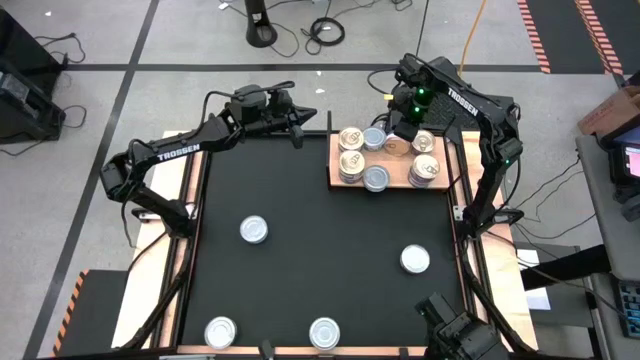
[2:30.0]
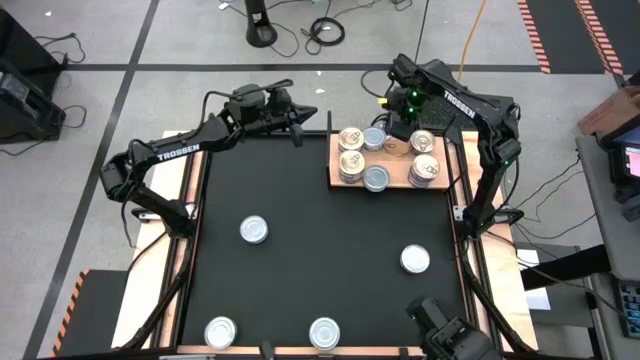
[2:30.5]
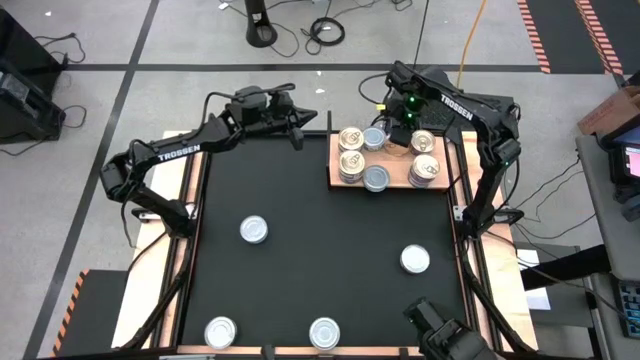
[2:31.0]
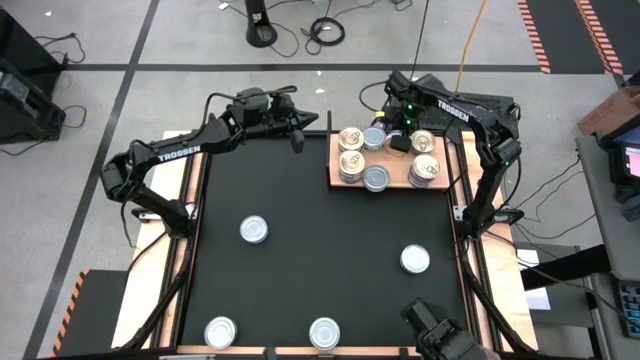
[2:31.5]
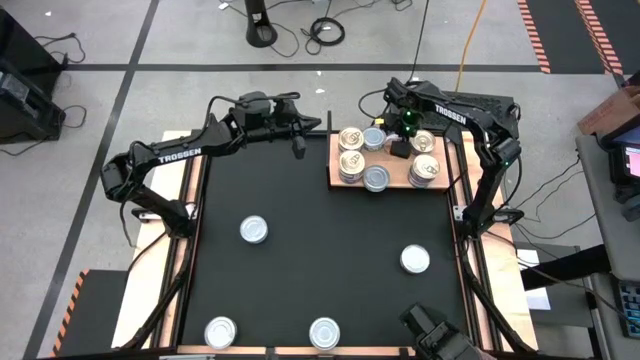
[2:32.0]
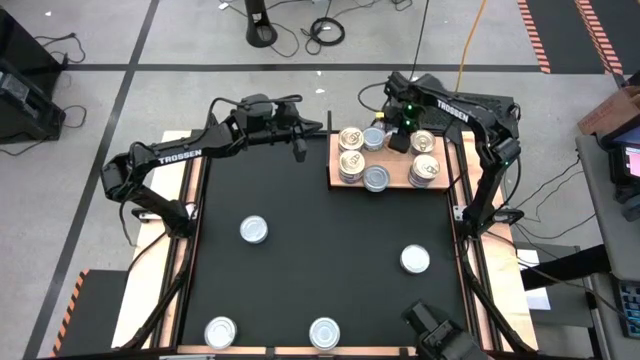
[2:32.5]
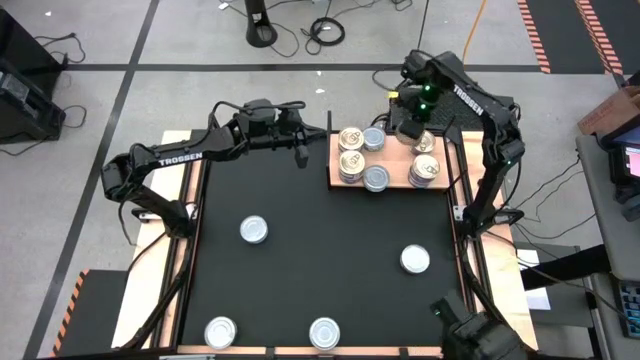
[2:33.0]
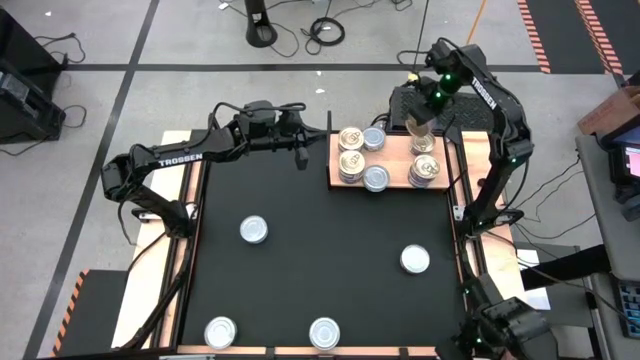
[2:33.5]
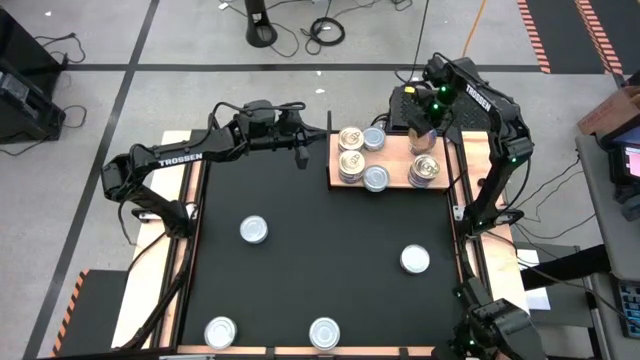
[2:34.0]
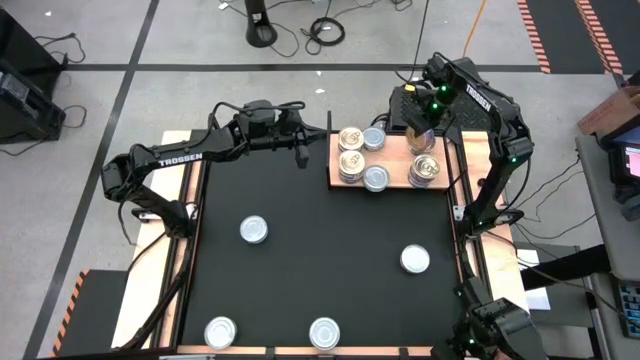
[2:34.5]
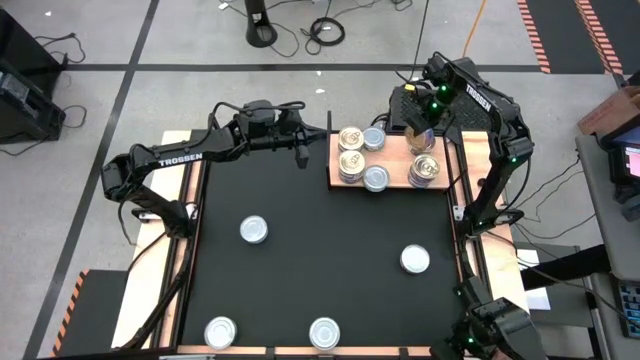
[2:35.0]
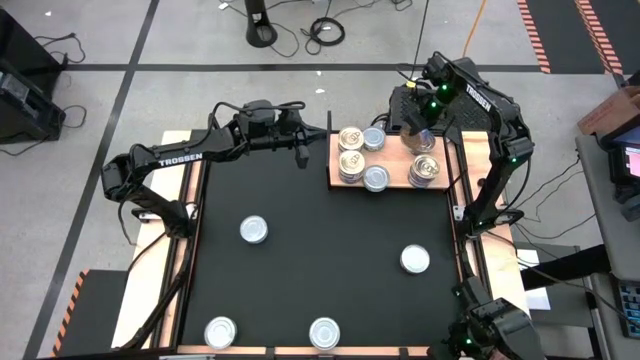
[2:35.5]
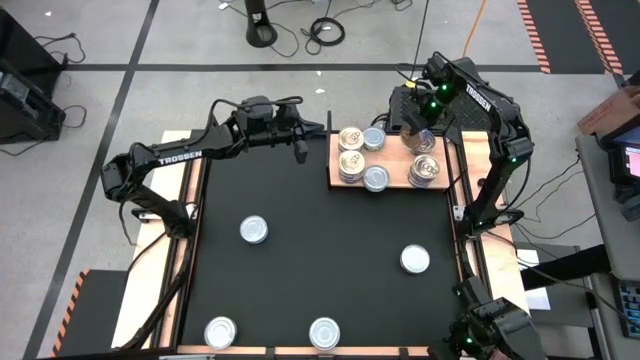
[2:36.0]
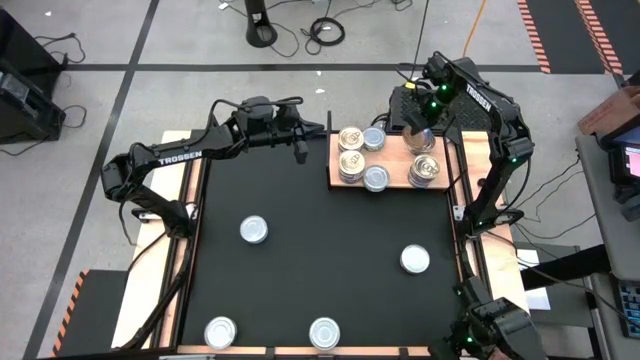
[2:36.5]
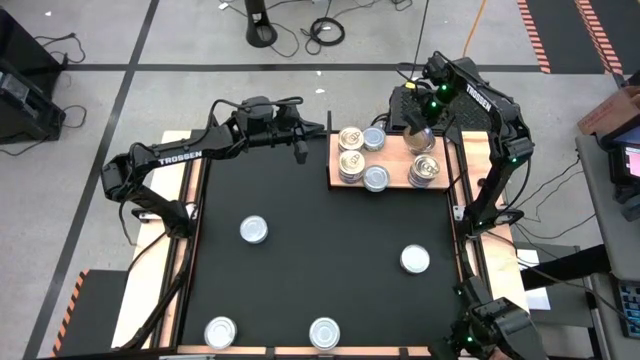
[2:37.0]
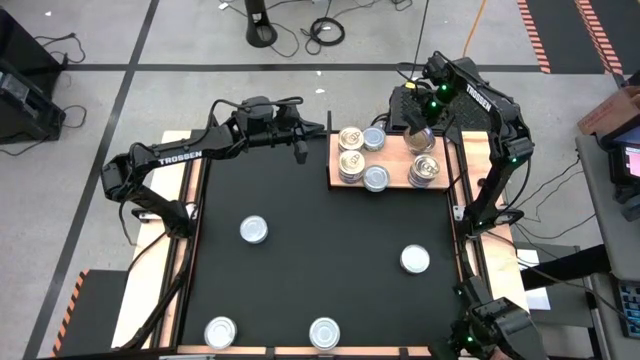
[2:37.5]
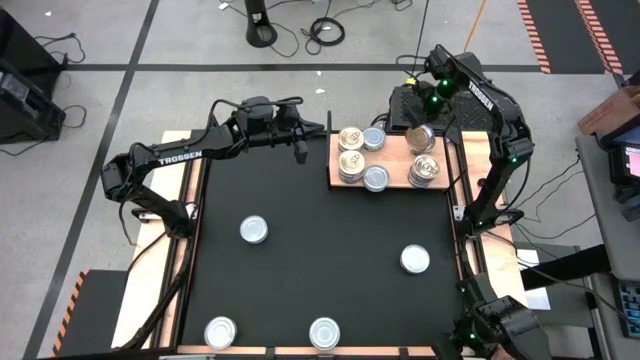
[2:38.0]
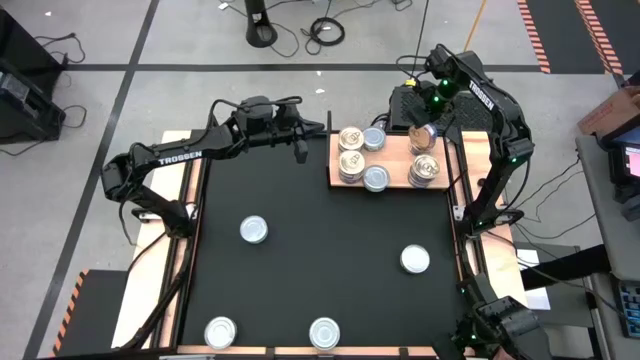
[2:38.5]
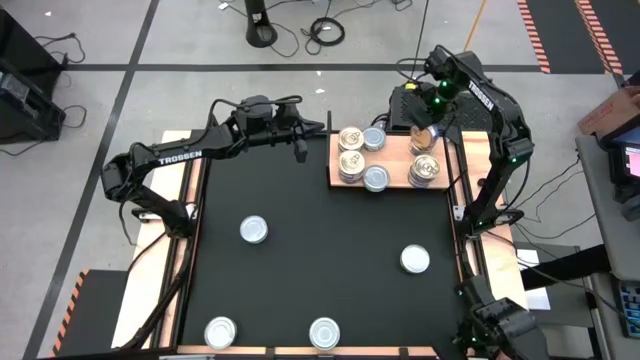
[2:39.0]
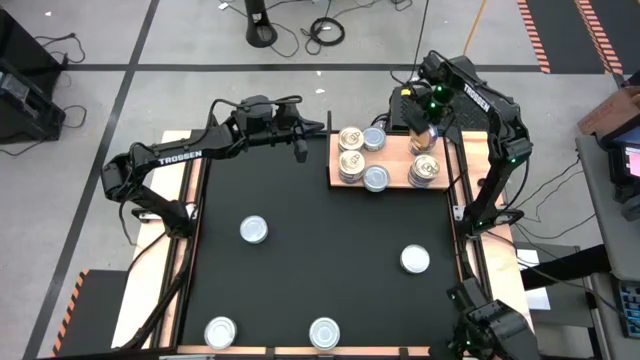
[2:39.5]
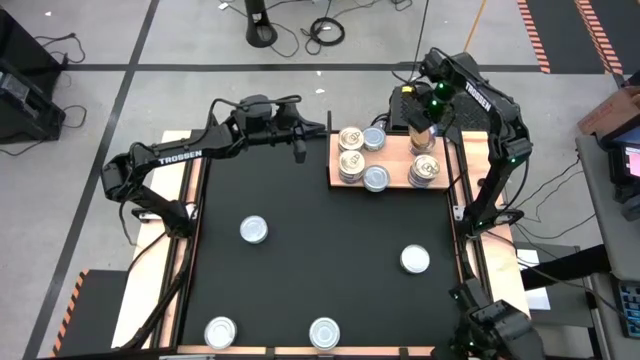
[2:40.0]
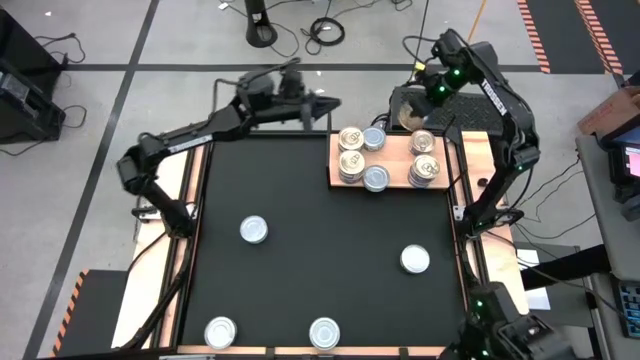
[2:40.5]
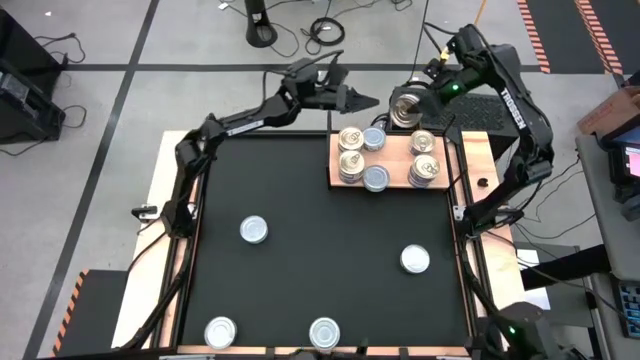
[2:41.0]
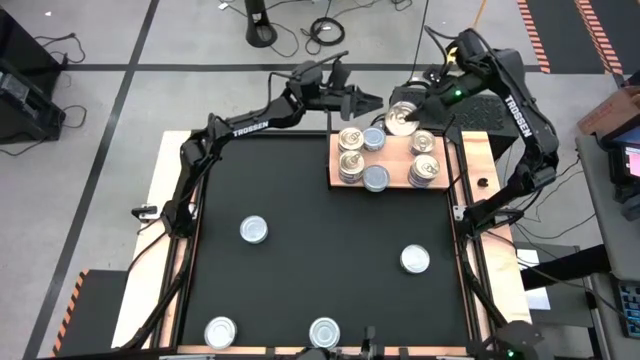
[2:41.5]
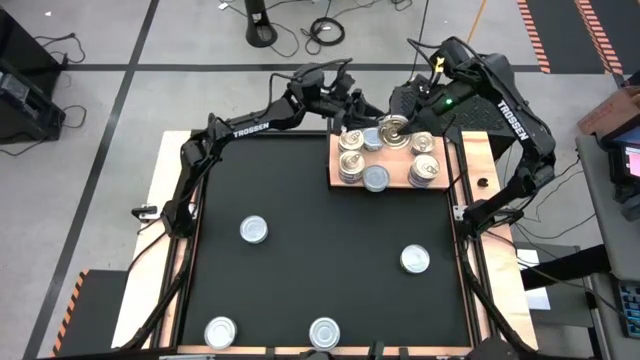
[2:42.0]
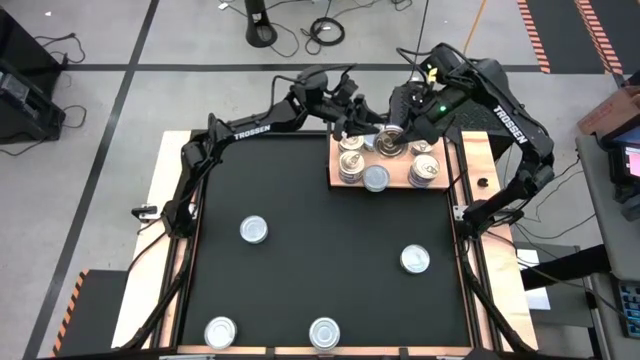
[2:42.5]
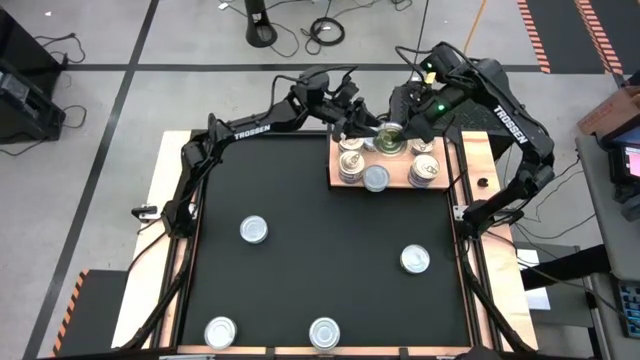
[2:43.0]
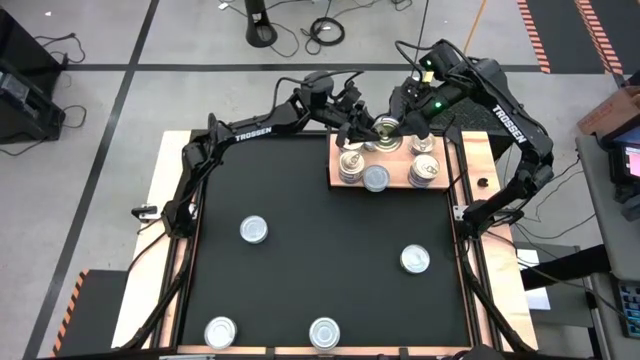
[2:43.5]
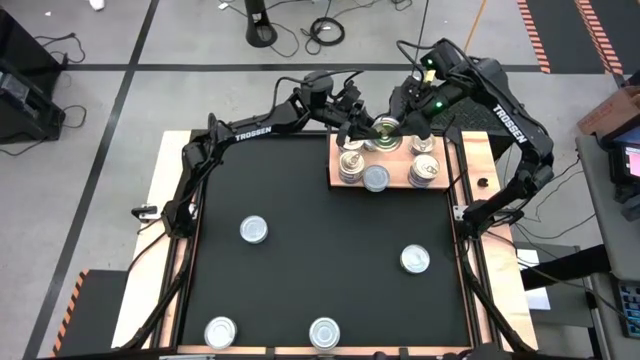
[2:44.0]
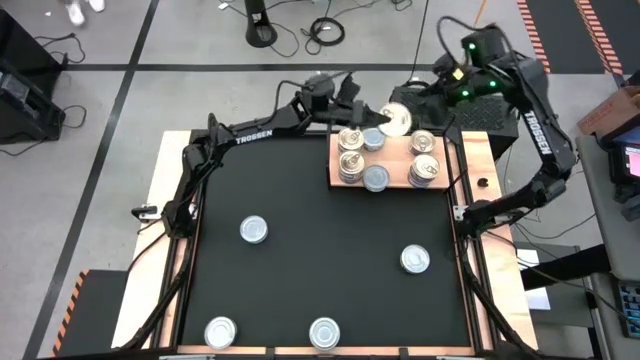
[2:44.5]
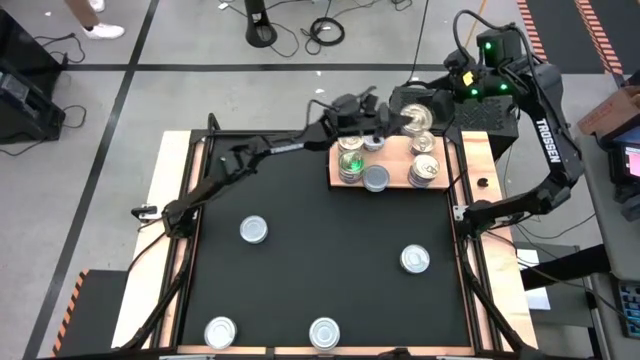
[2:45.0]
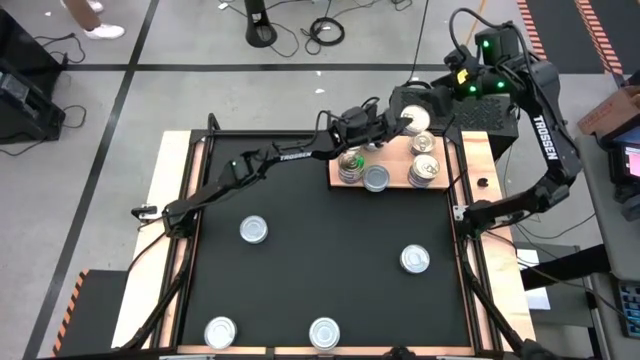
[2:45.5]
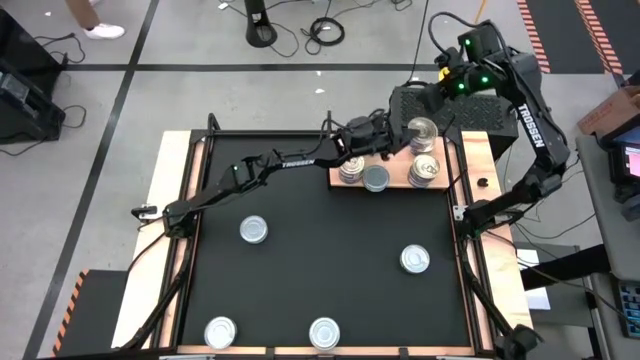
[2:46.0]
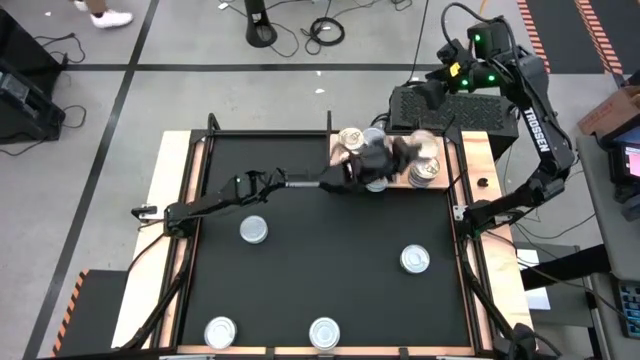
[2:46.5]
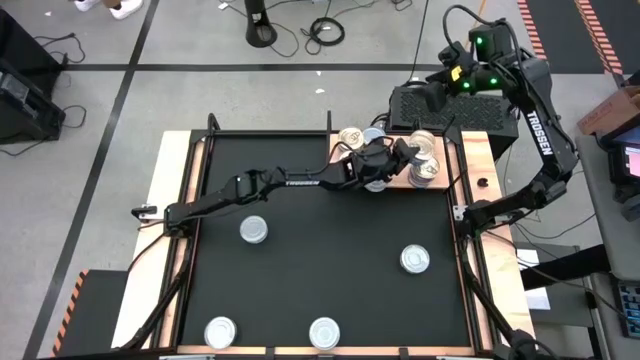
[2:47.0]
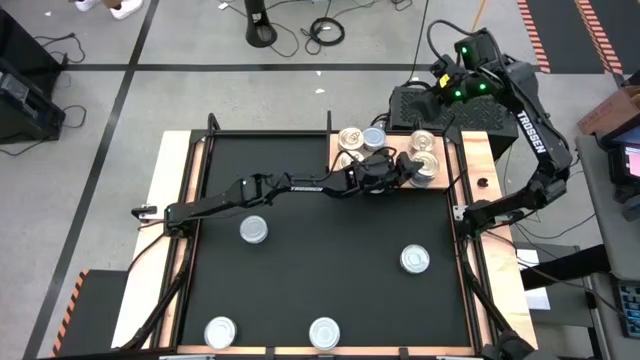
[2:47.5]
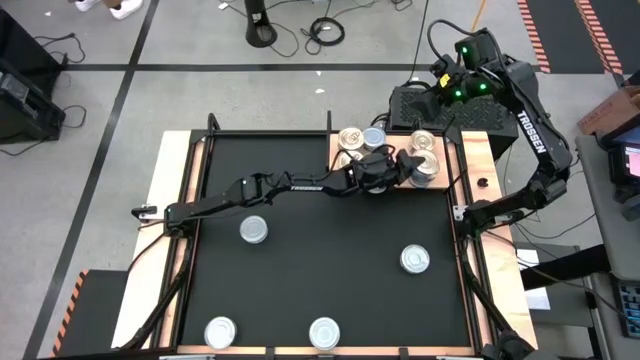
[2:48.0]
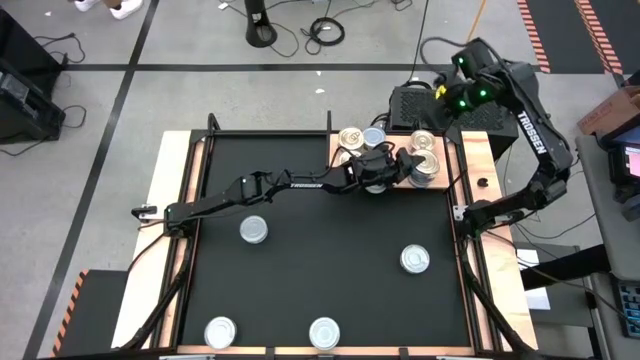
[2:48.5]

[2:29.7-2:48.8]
Task: Stack canned seafood by type on shelf
Stack the blue pink tuna can on top of the other blue pink tuna can on the shelf

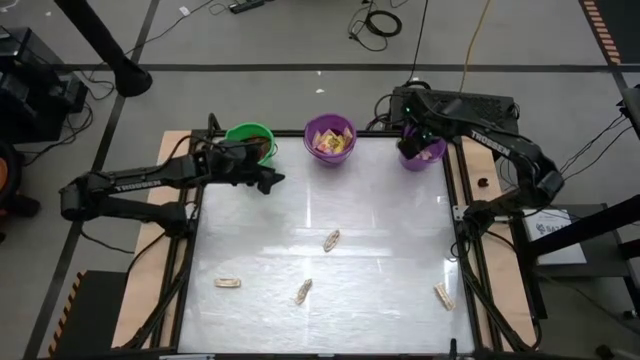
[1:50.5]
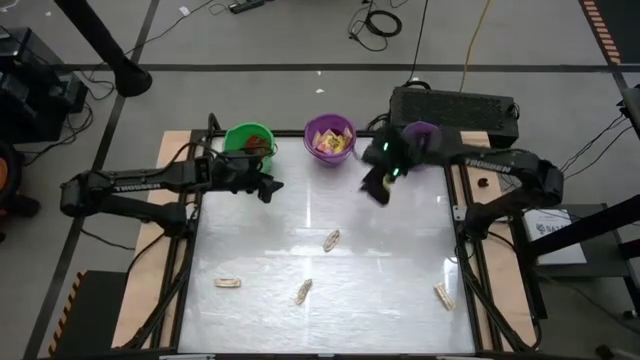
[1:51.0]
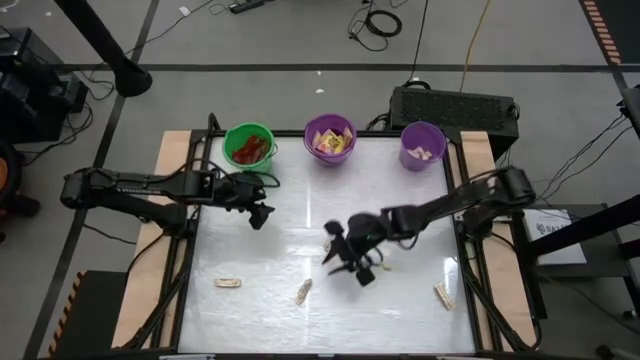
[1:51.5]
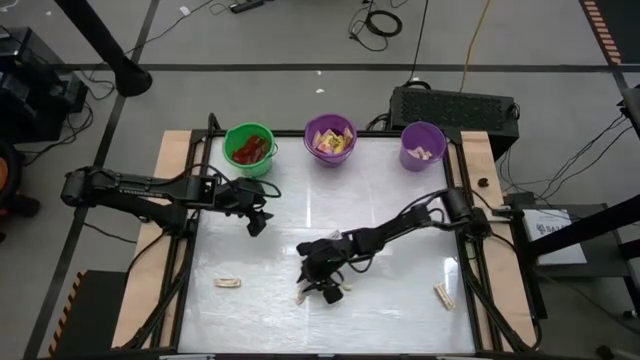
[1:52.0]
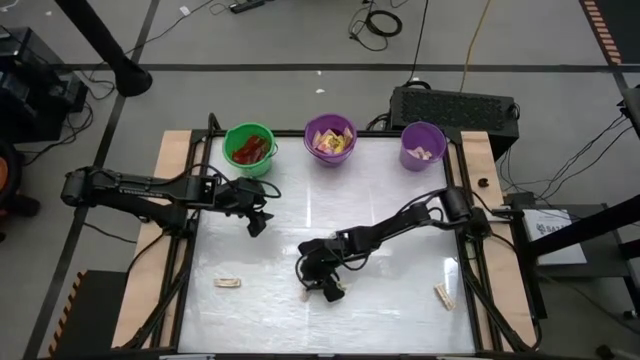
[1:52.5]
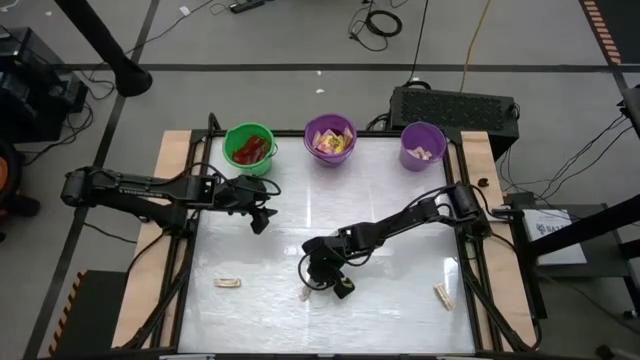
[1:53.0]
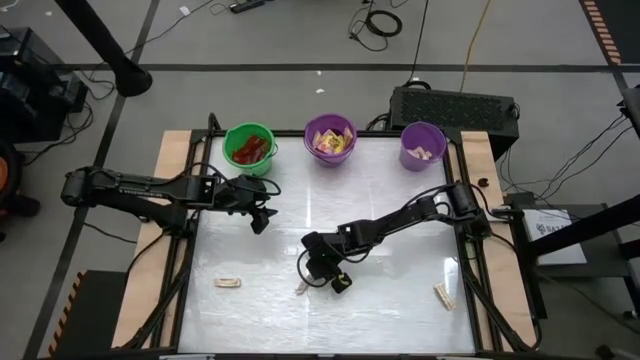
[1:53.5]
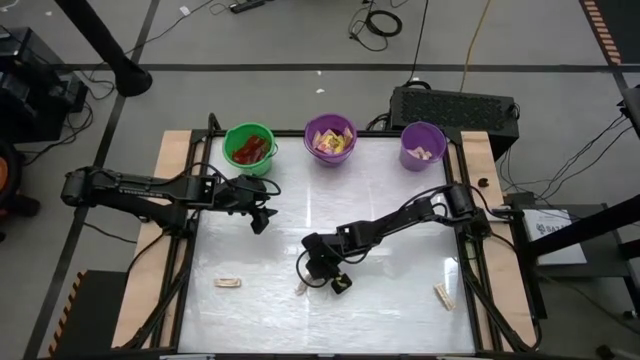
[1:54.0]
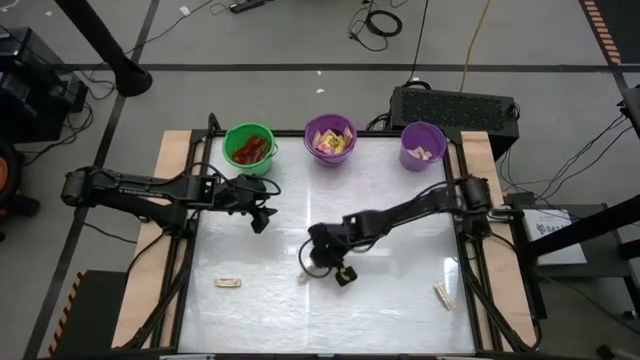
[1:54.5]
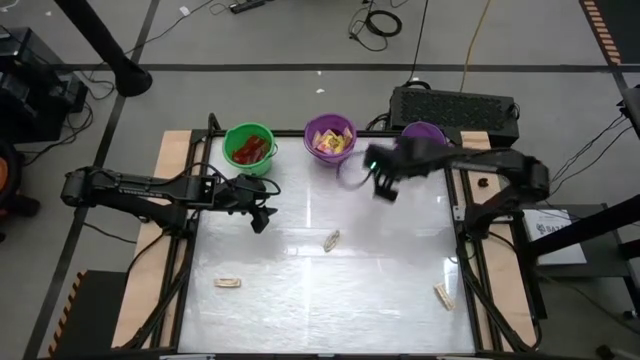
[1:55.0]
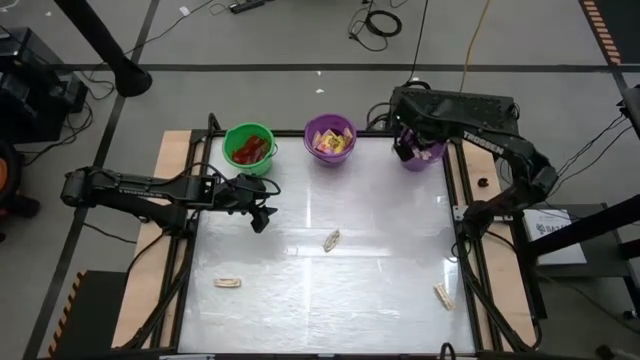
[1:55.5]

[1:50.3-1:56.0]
Task: Sort candy by brand, put in halloween buckets
Put the white candy pack in the right purple bucket
